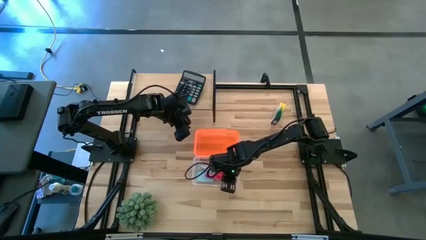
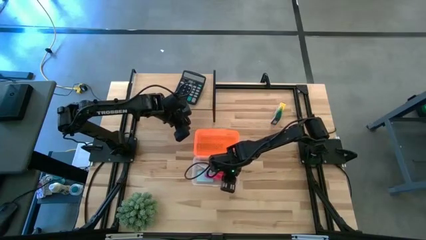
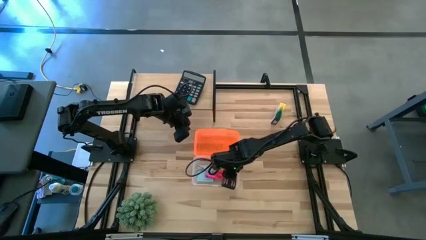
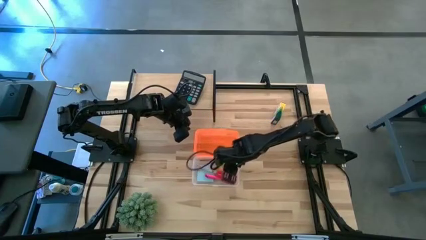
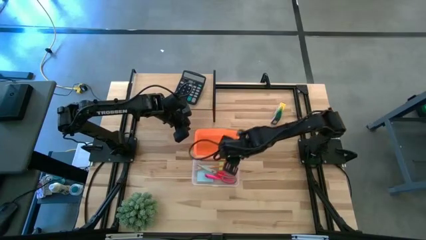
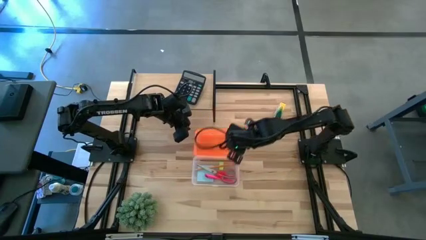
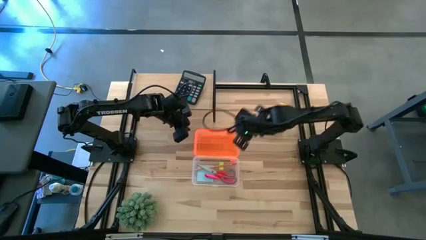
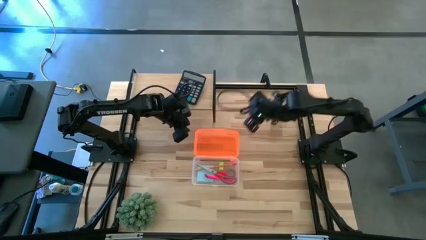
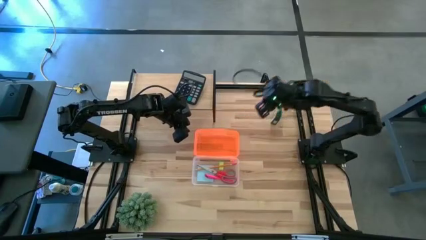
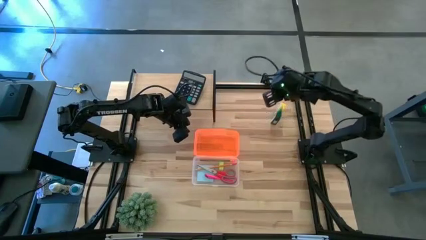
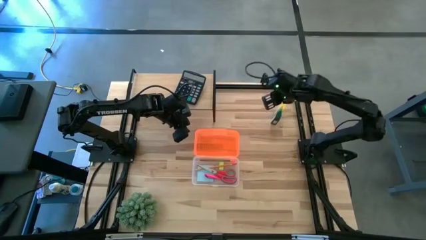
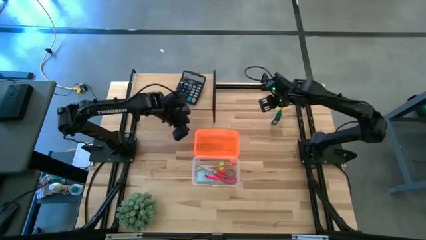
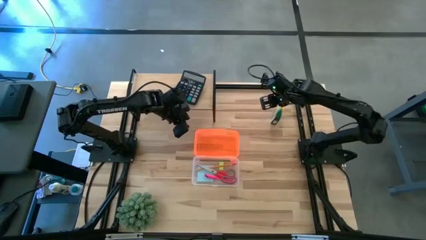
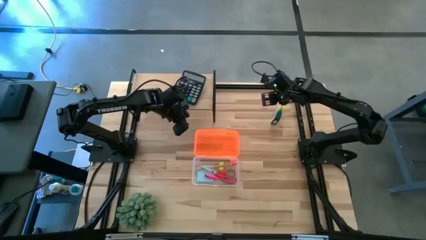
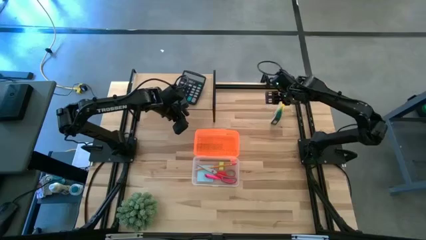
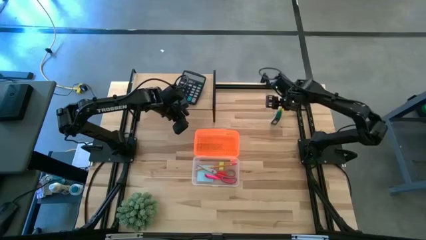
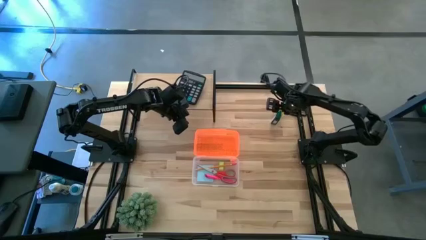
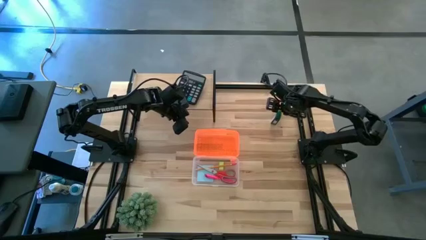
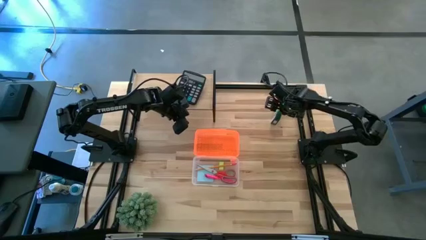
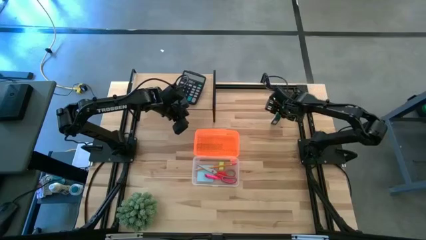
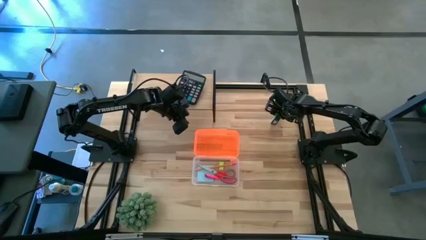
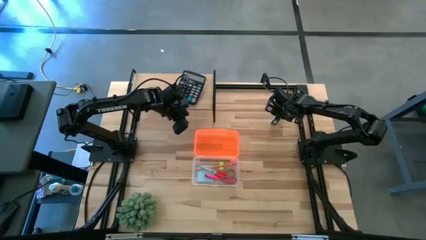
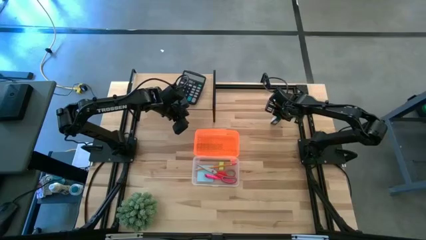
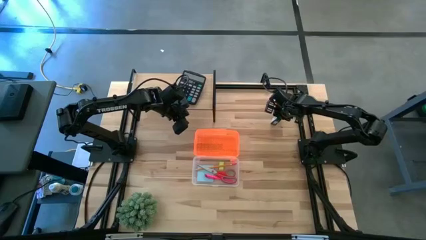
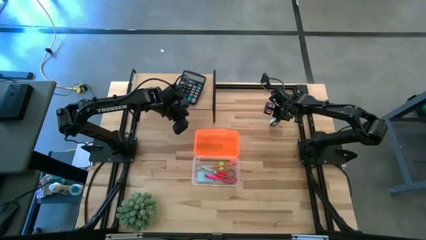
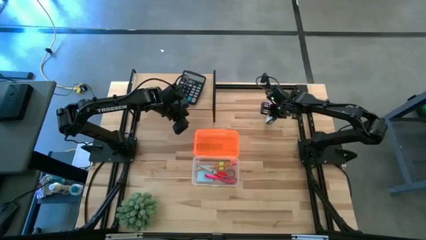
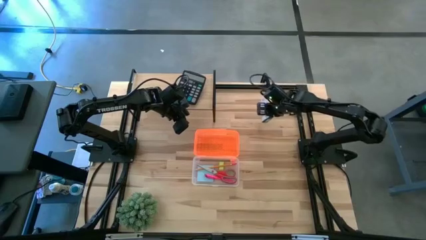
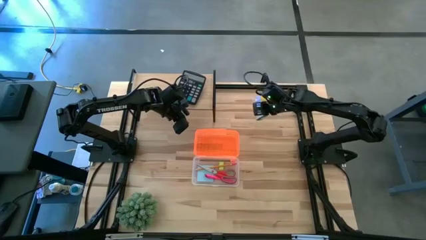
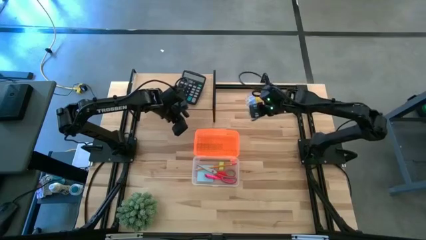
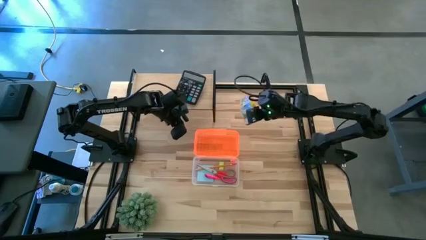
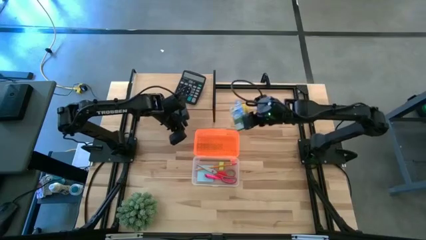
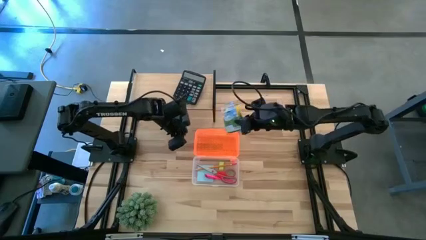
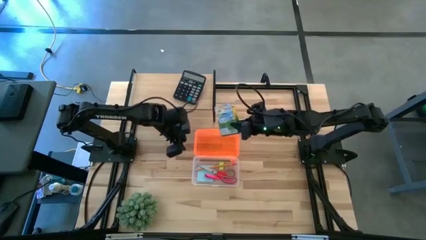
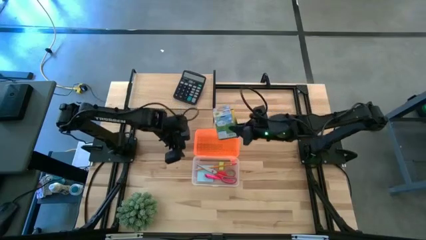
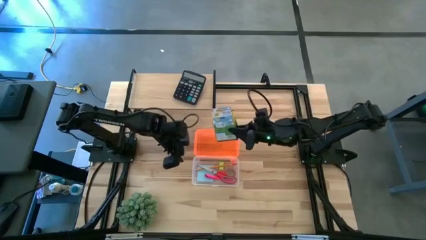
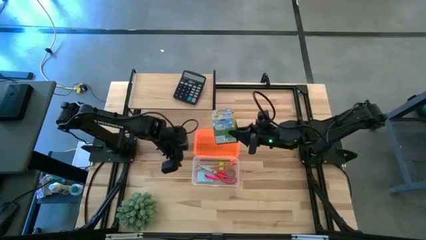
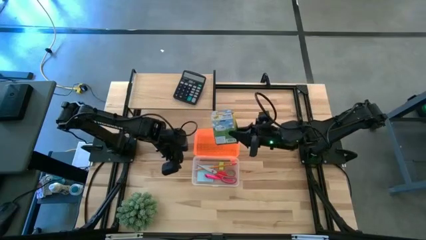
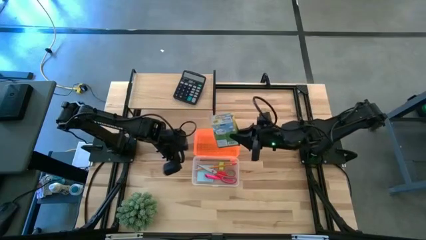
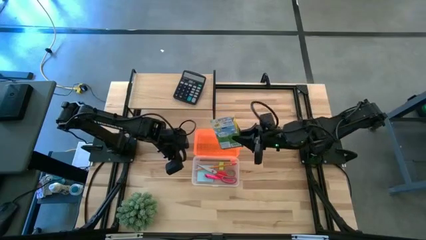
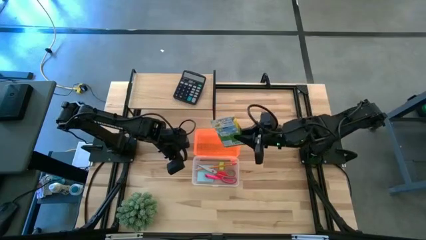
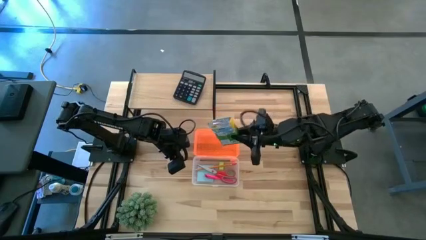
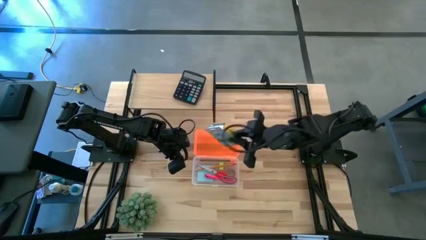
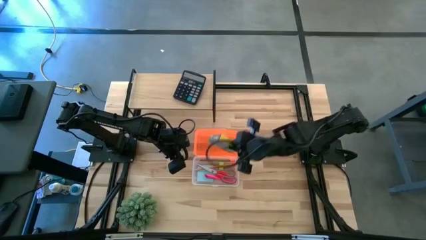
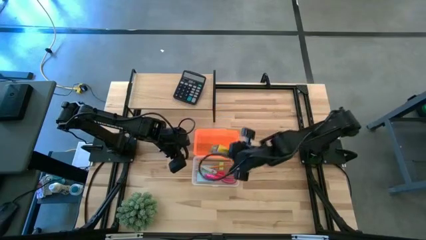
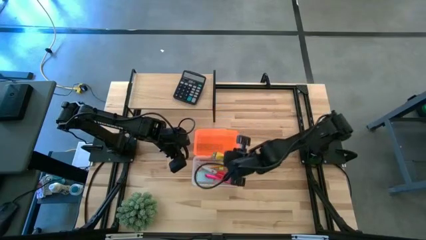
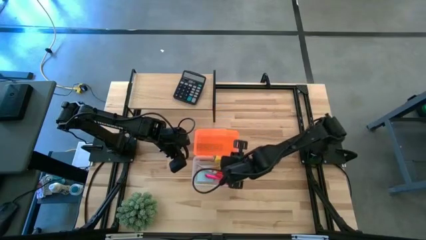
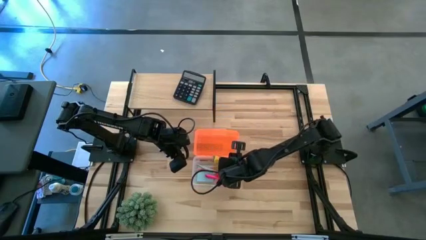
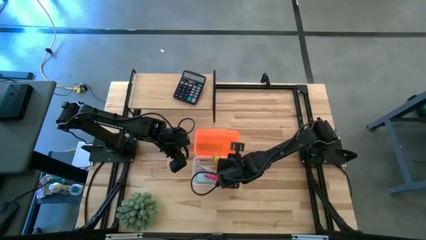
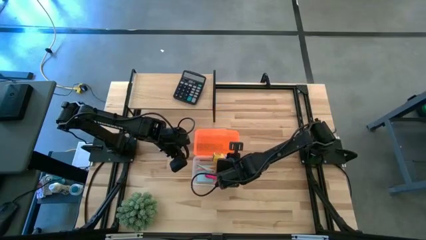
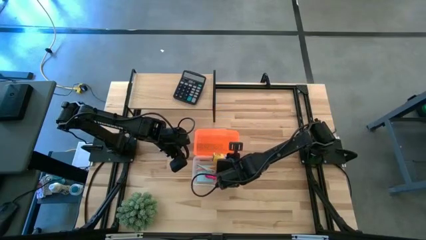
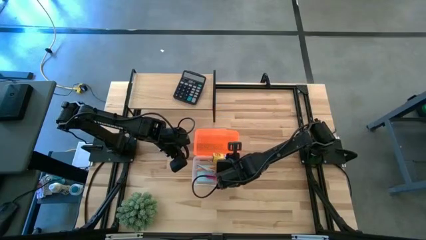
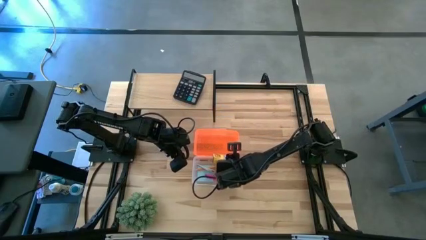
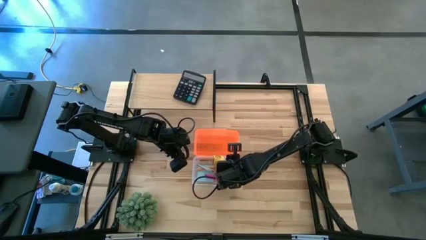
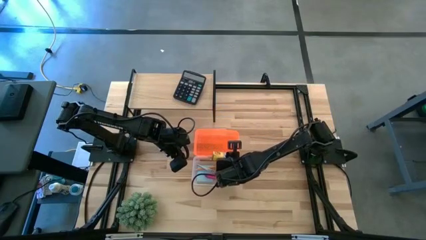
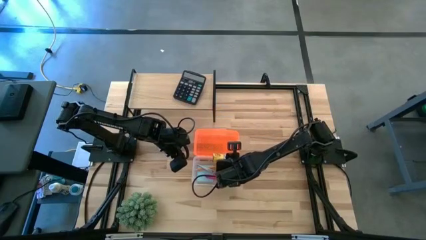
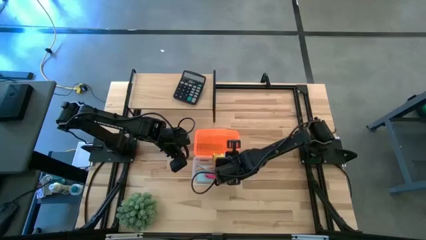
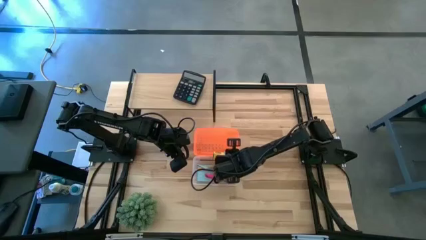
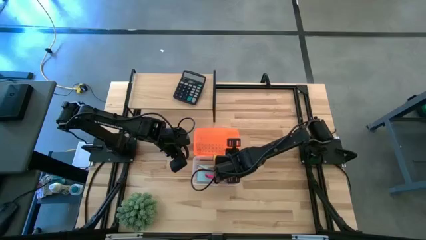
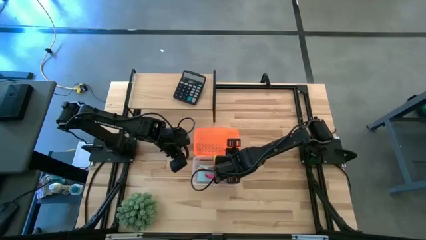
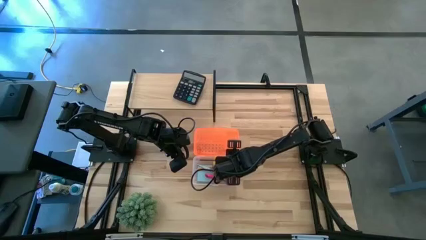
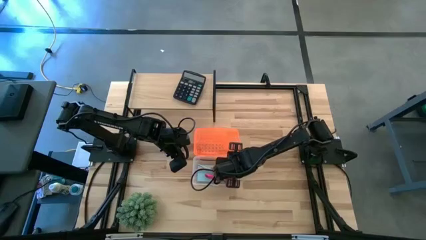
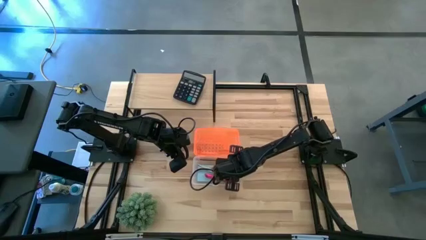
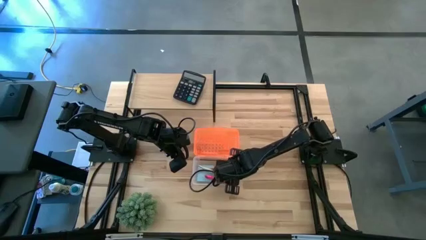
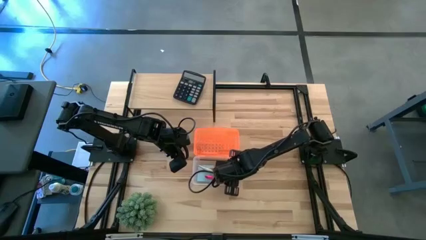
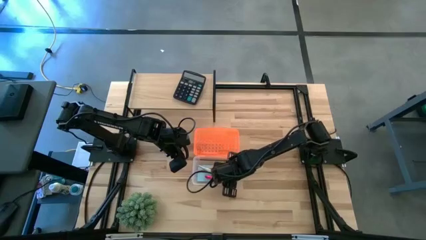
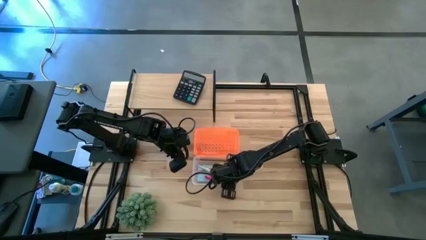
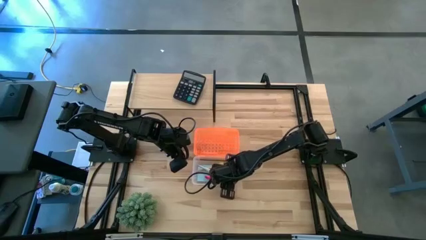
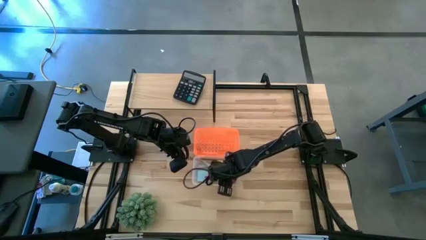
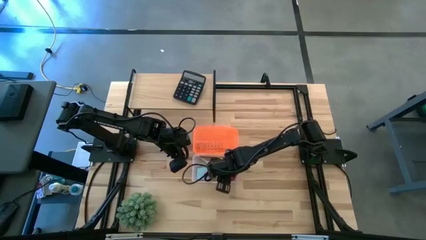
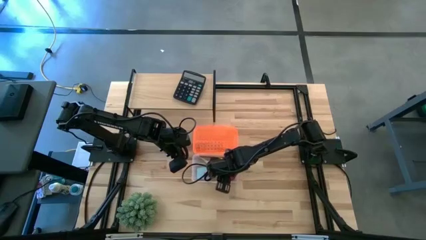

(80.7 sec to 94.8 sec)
Task: Pack school essentials
Put the crayon box into the school supply box
